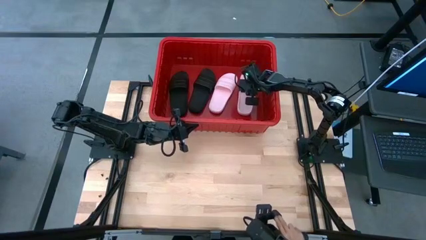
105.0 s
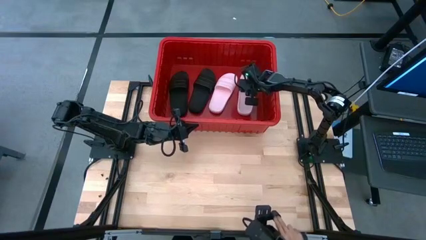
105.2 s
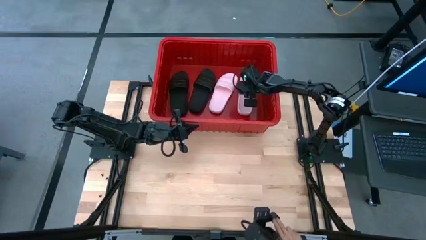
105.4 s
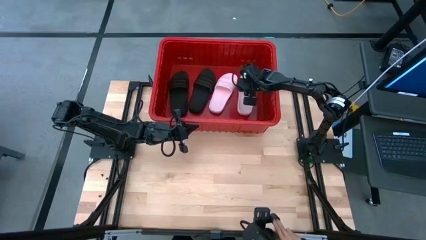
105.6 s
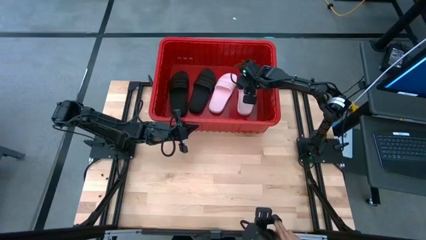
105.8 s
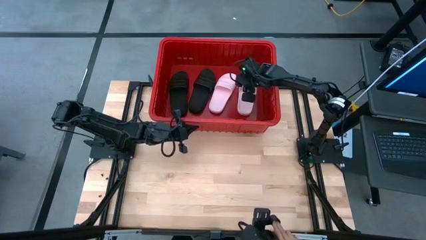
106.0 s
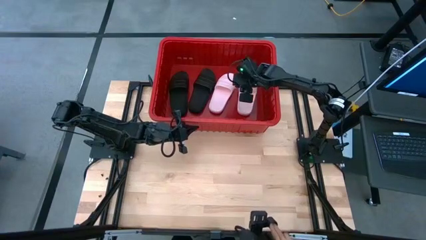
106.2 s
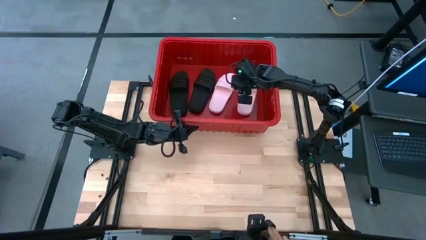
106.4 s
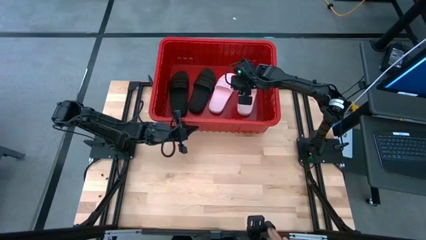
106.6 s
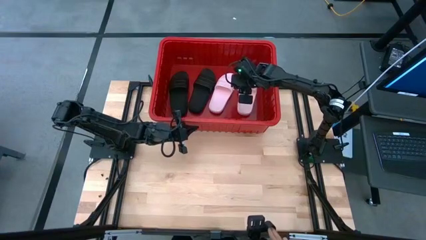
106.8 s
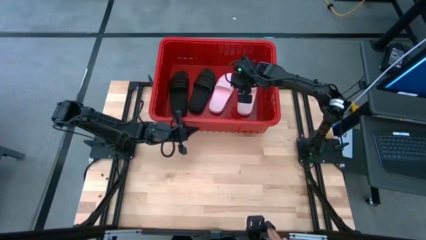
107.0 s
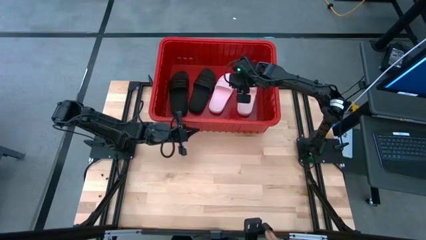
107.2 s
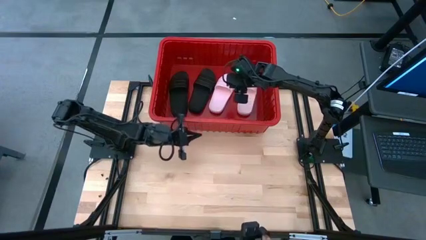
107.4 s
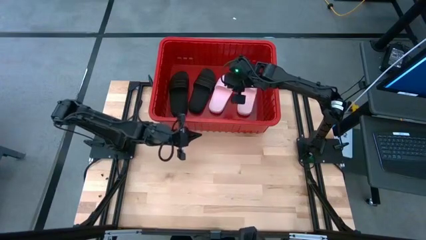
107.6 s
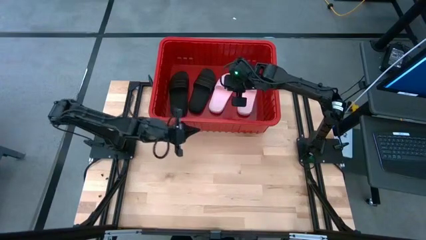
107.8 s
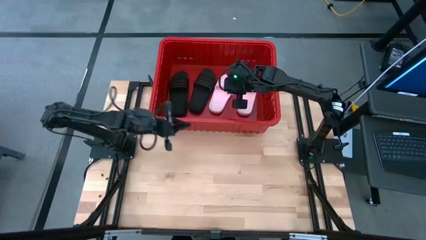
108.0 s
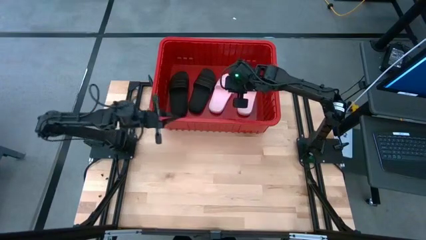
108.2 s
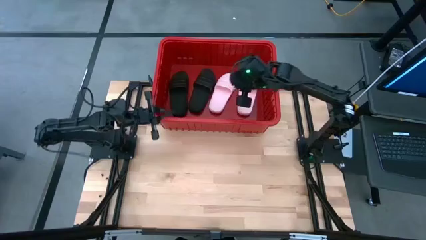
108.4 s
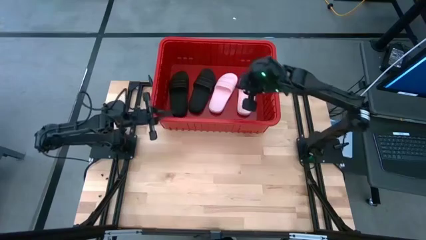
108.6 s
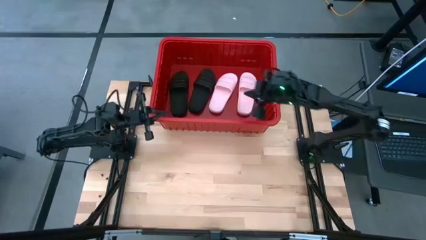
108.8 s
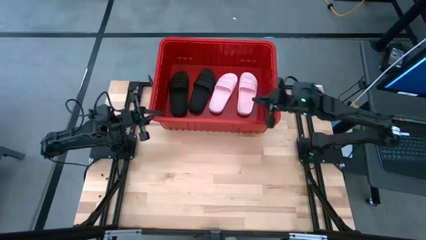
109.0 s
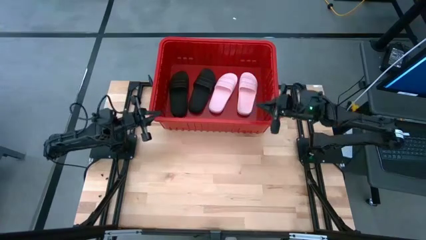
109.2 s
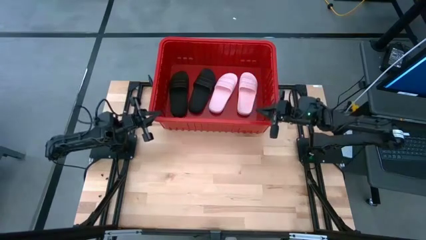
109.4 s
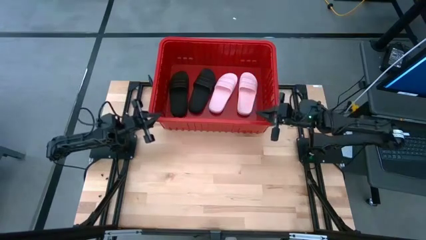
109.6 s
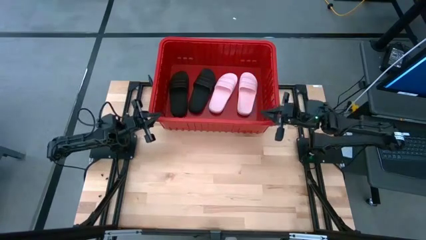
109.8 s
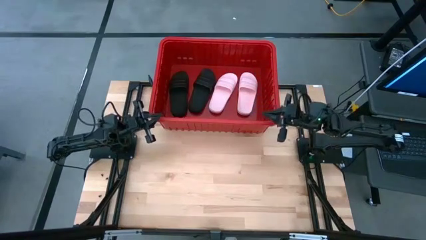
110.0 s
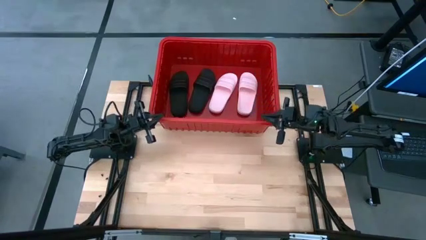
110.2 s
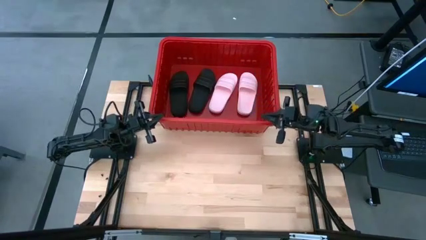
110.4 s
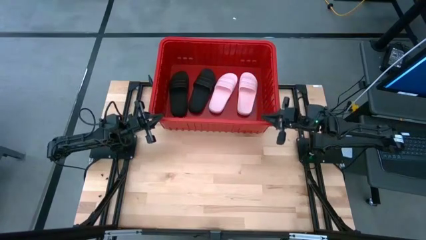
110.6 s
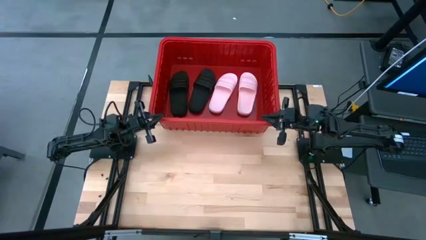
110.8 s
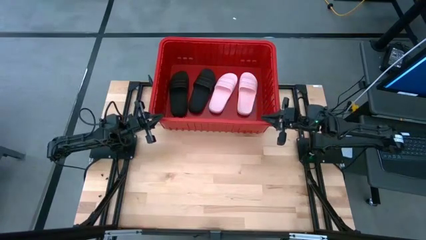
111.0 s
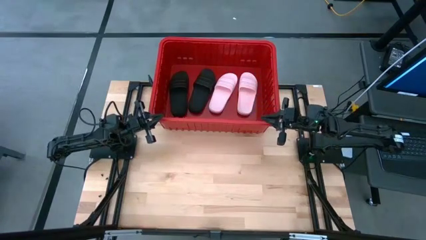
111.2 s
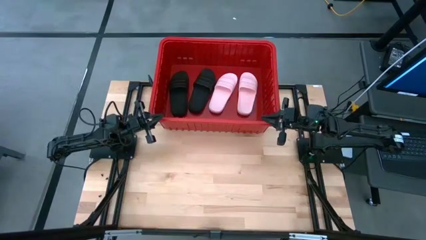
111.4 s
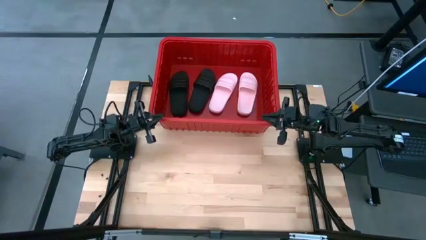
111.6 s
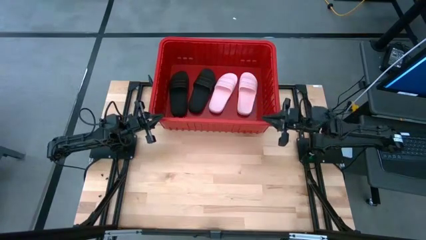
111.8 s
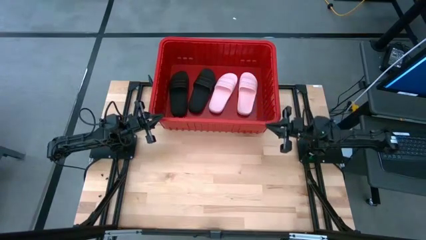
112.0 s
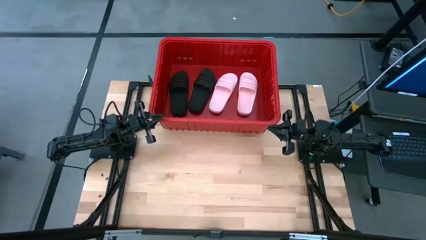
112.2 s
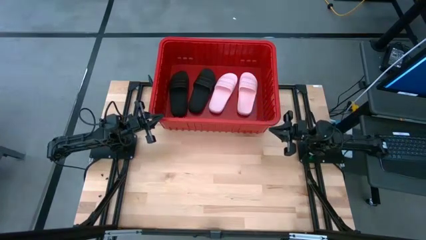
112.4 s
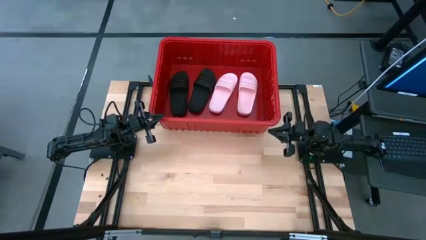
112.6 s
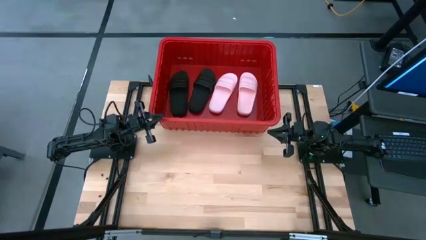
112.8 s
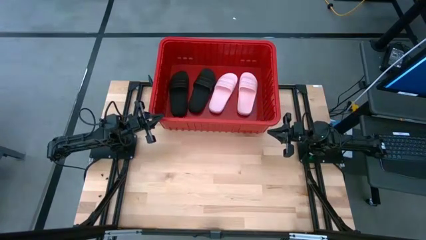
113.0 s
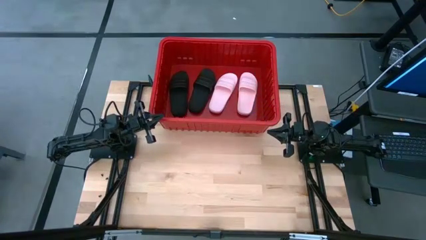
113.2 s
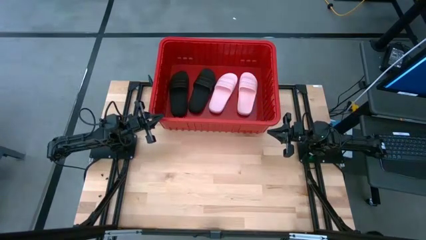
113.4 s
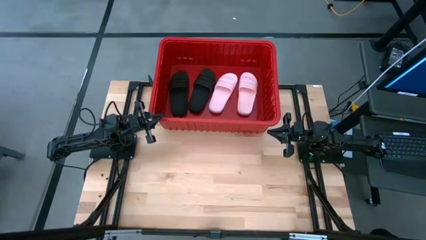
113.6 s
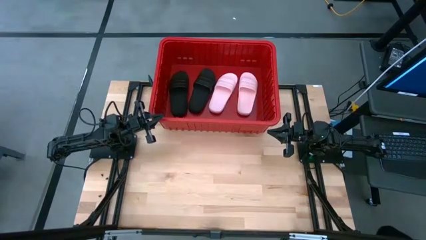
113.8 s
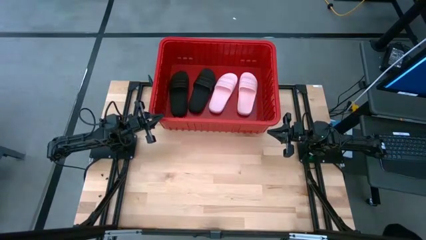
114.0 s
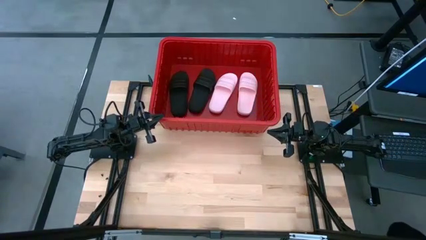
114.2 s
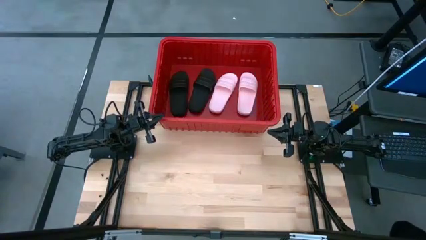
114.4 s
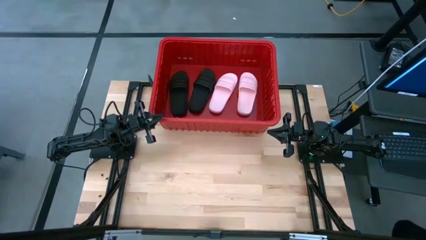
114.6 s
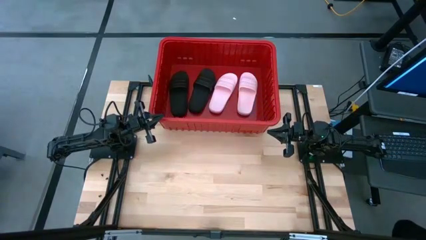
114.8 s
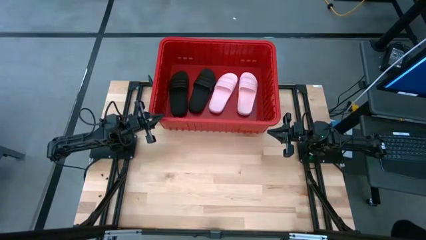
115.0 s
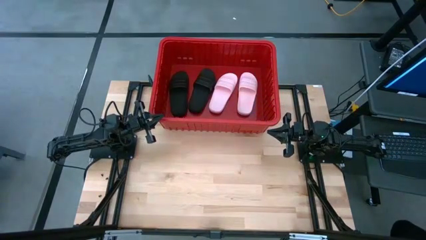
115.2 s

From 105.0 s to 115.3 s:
Task: Pick and place slides into bin
Return to Home Position

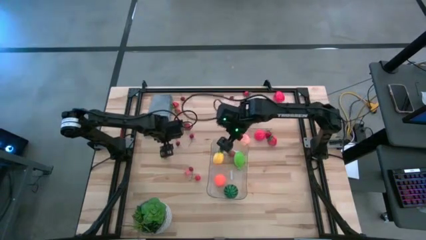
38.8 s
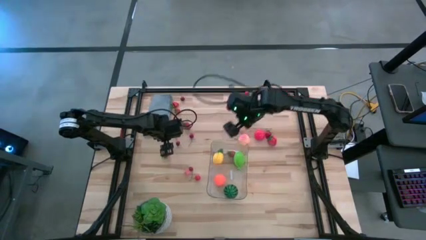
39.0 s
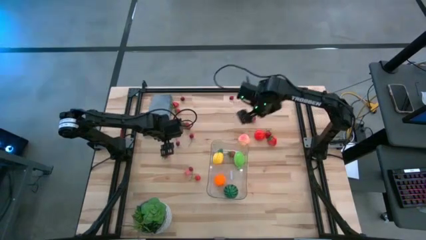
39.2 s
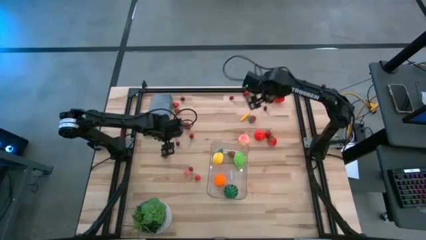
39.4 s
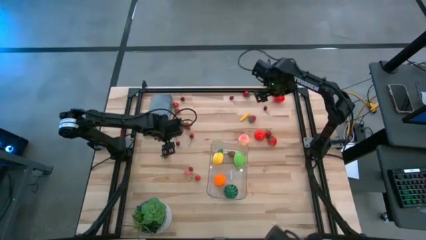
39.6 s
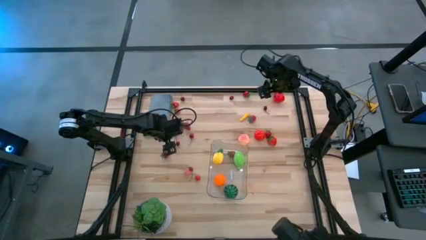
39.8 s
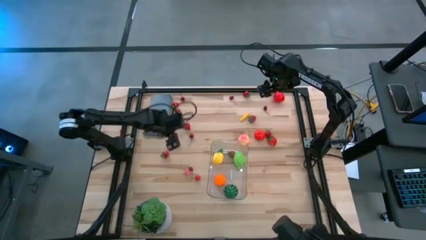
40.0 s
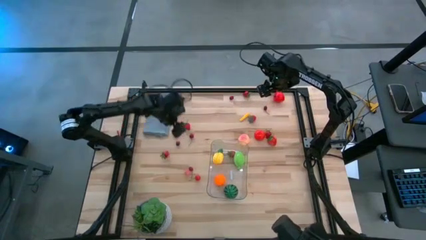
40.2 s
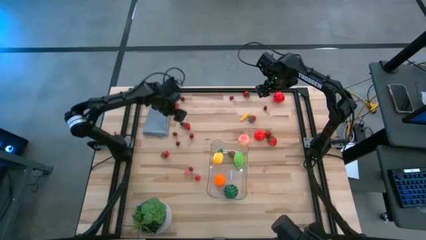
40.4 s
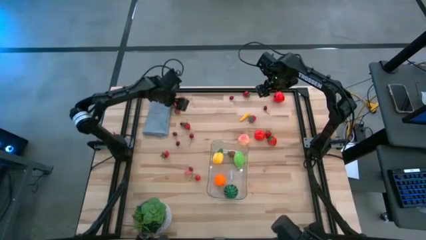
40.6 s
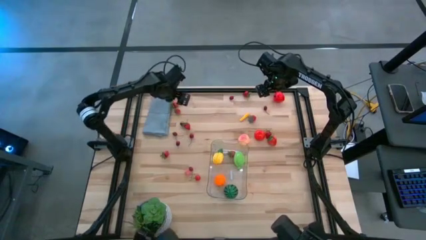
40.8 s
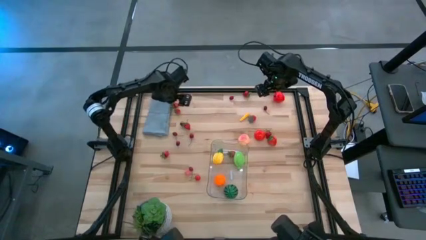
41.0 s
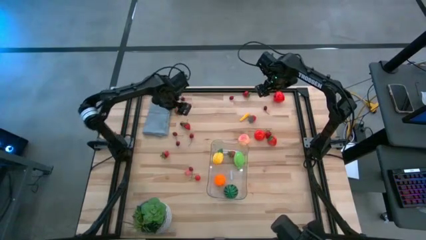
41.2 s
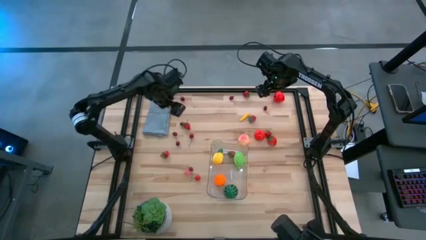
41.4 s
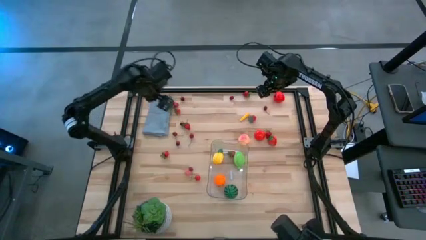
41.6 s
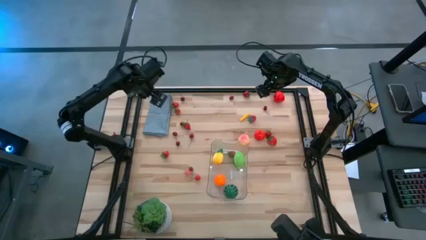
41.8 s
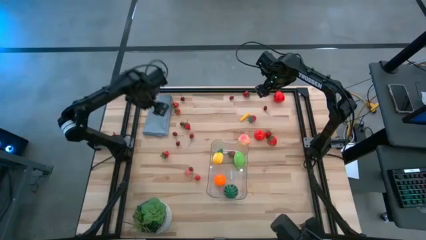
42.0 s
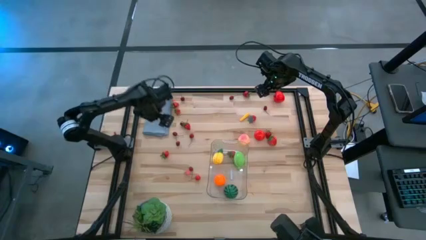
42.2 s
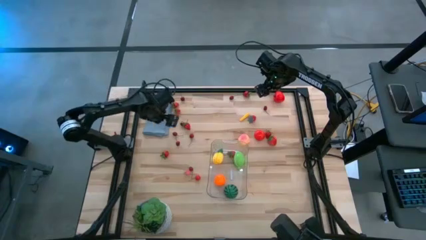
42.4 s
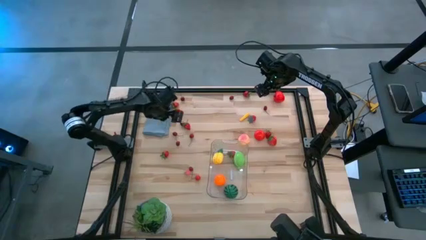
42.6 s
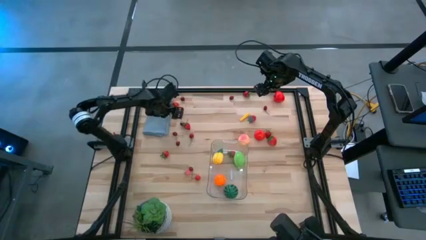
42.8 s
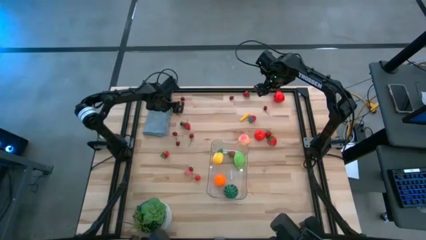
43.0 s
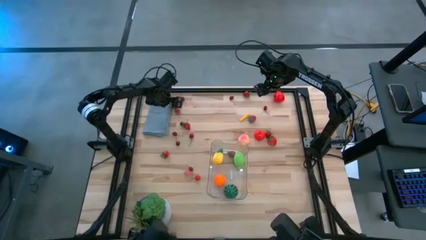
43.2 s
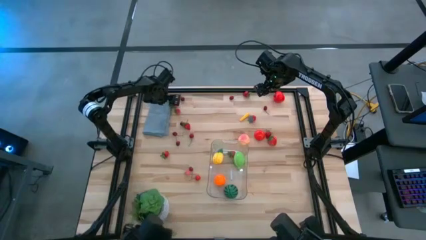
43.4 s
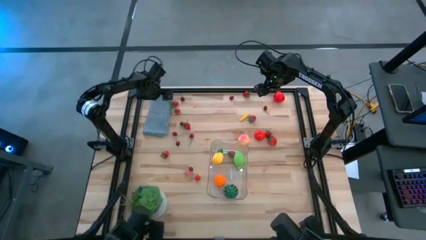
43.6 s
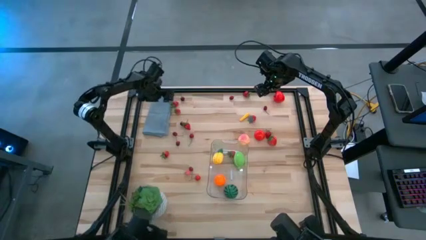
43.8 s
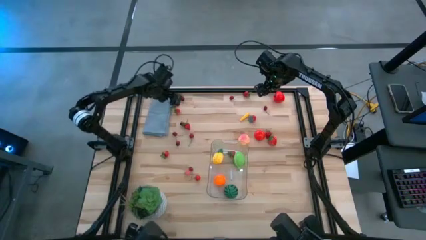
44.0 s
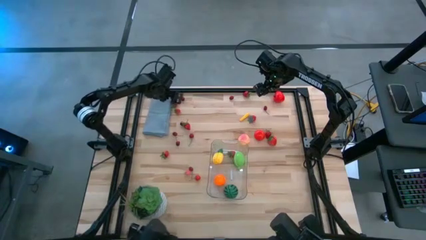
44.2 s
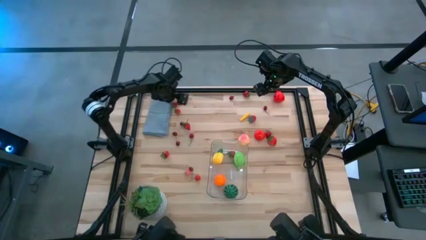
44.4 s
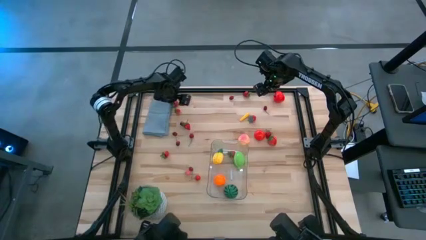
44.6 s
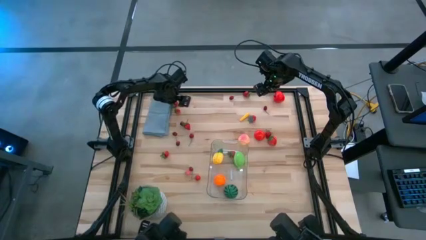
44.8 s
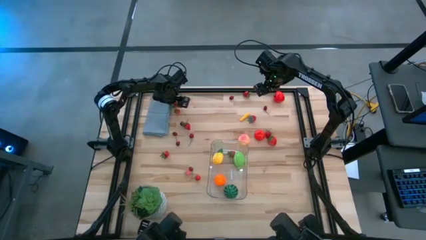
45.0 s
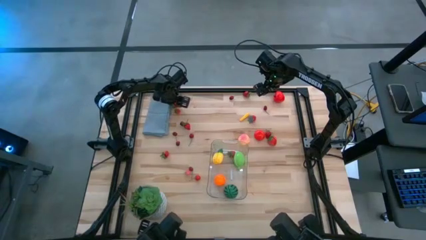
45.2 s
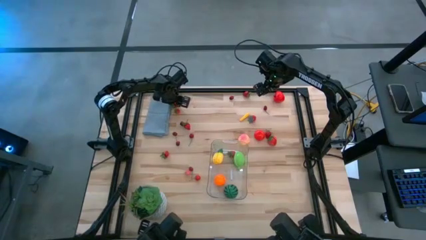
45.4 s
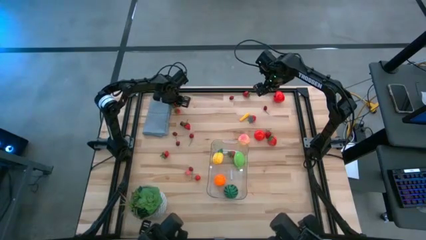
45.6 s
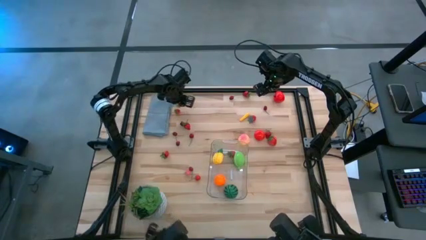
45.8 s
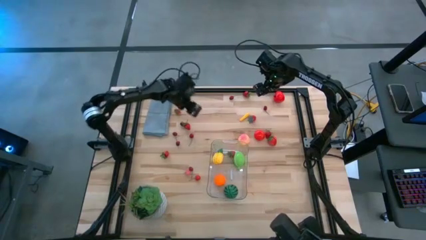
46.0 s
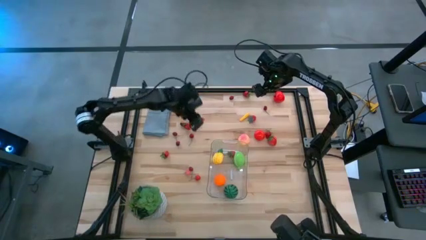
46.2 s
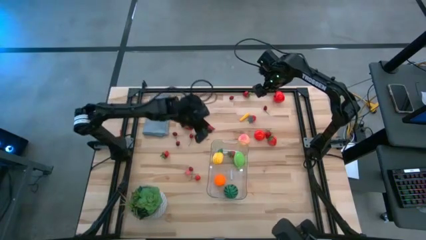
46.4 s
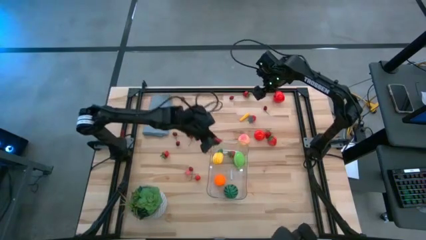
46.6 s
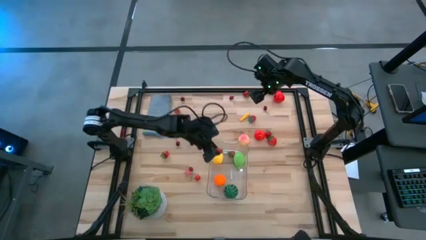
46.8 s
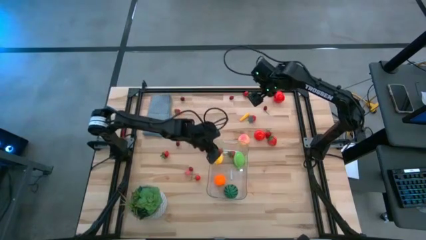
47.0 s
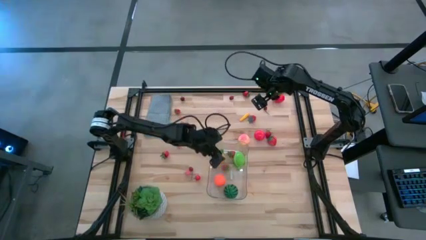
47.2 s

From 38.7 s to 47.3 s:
Task: Pick and placing Produce into tupperware
Put the strawberry into the transparent bin
